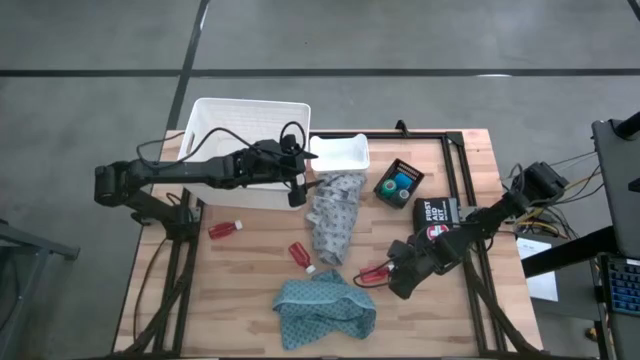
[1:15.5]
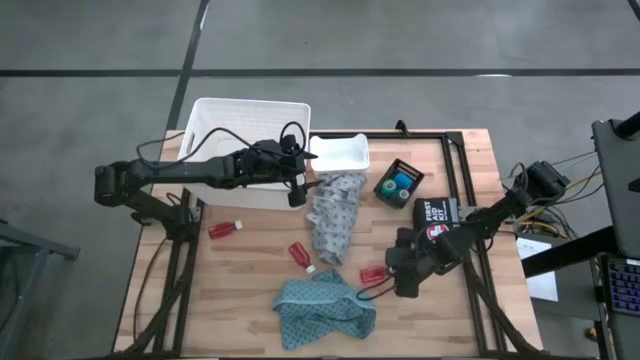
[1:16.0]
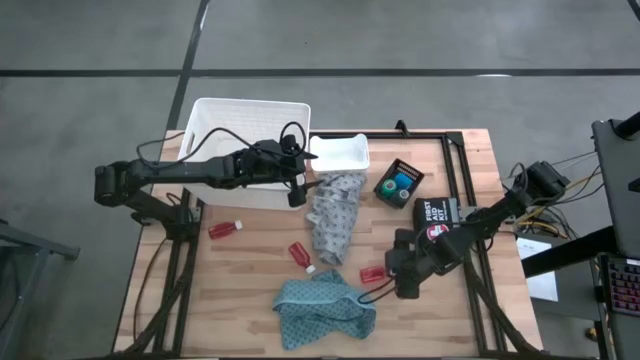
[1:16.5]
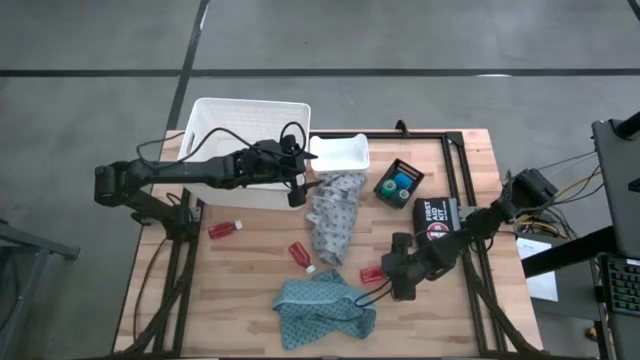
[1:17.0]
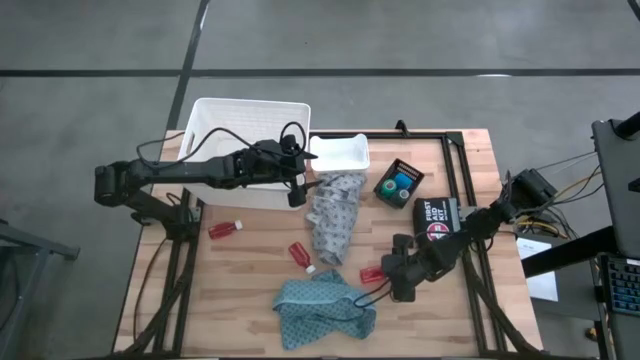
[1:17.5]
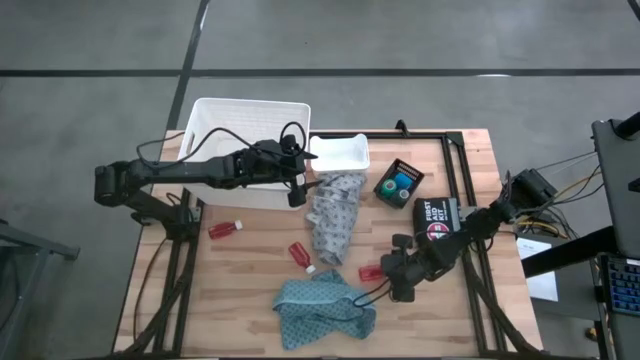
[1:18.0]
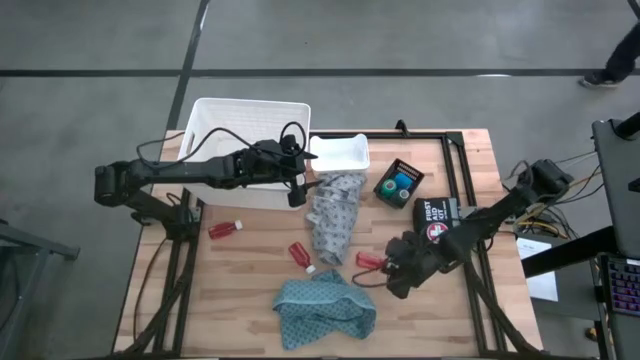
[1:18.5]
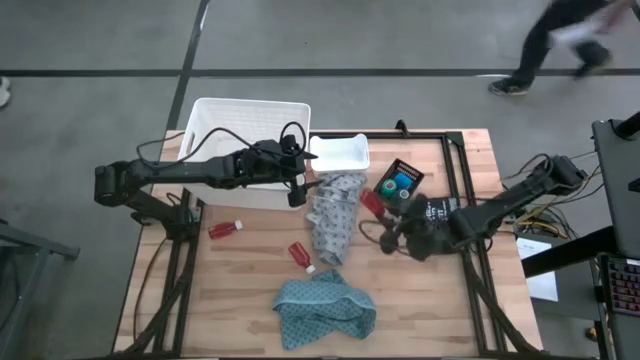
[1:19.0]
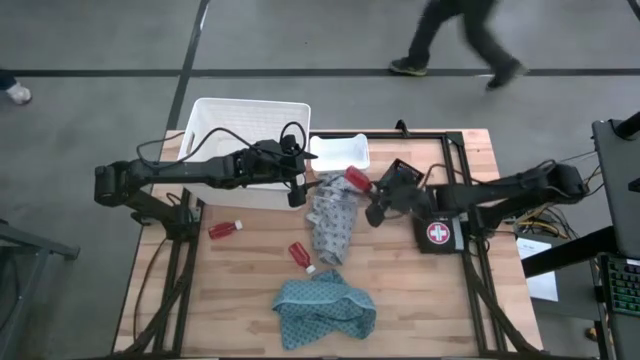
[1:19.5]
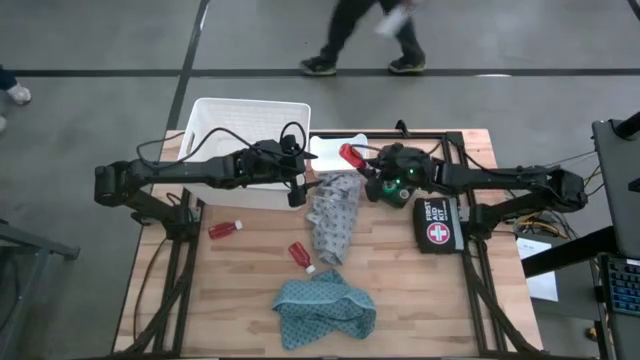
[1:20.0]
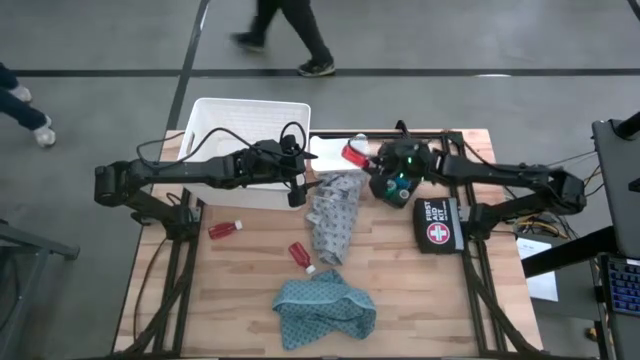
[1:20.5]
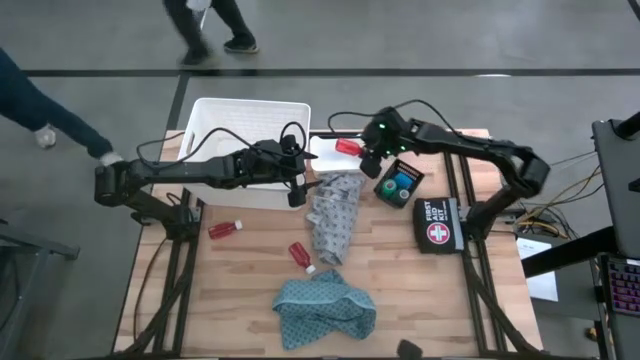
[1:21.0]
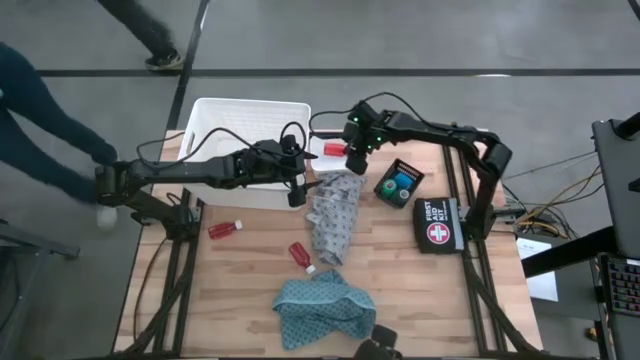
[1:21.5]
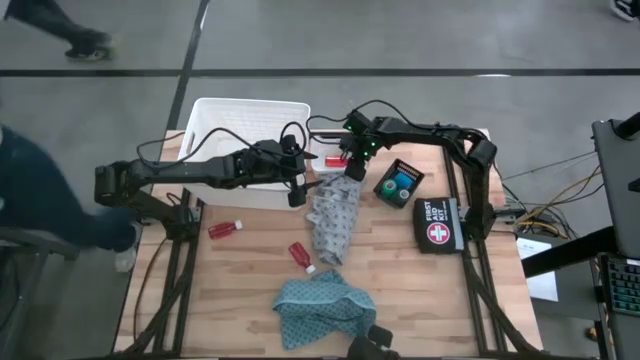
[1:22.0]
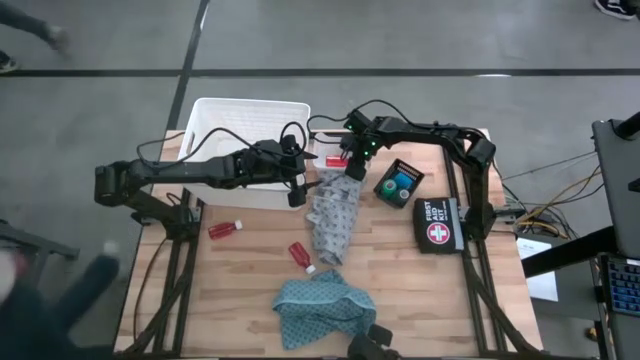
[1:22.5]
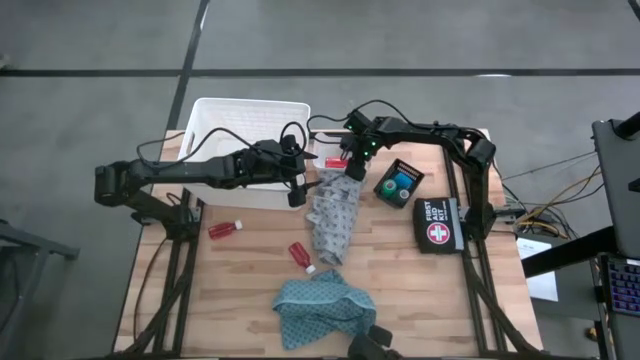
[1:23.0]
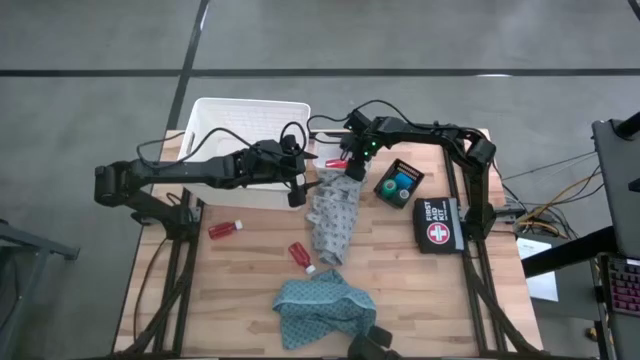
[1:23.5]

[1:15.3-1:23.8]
Task: Pick & Place Medicine items
Put the right red medicine bottle into the small white bin

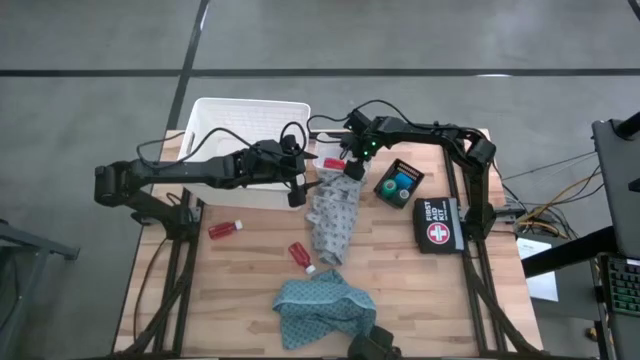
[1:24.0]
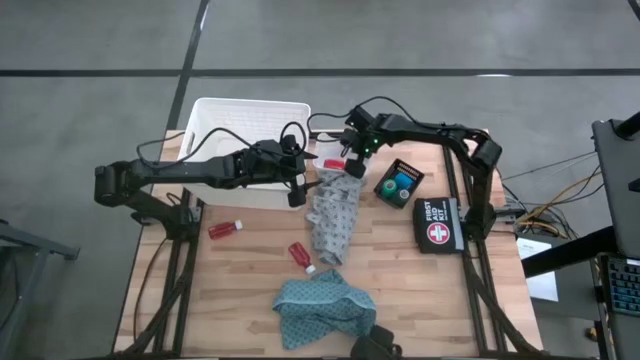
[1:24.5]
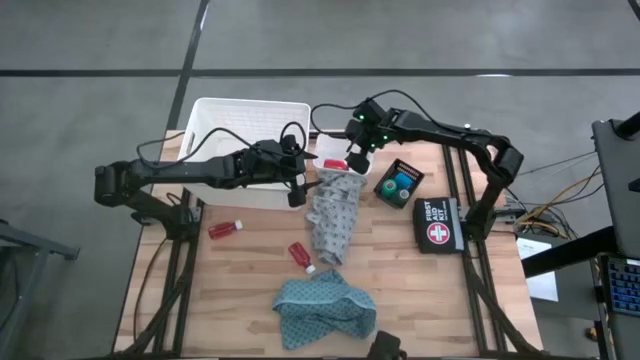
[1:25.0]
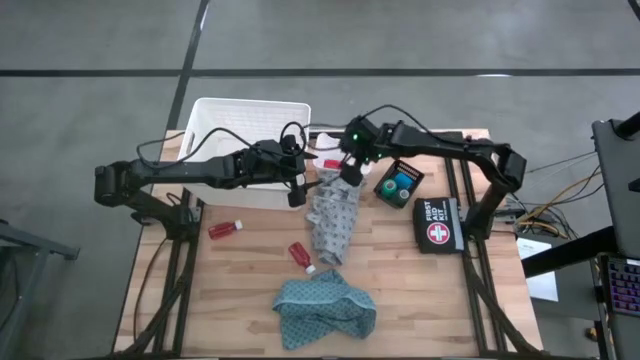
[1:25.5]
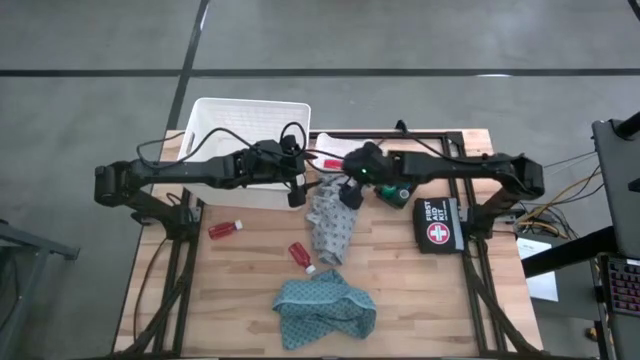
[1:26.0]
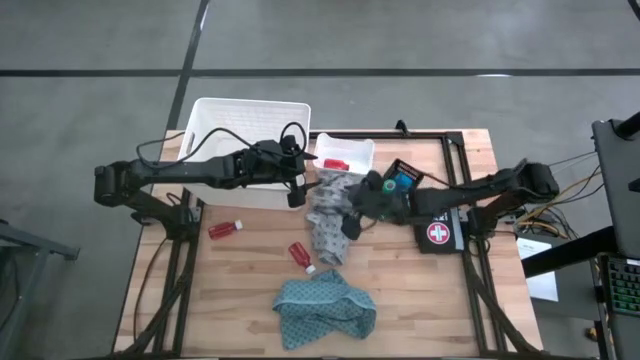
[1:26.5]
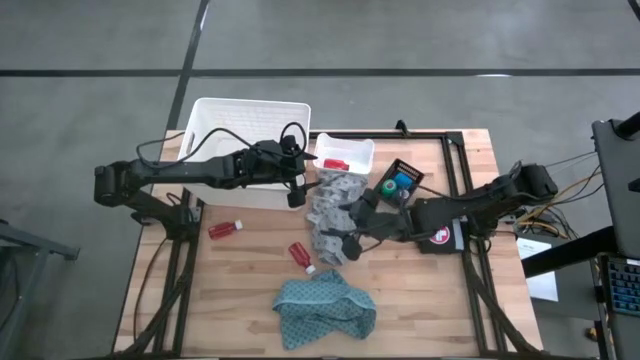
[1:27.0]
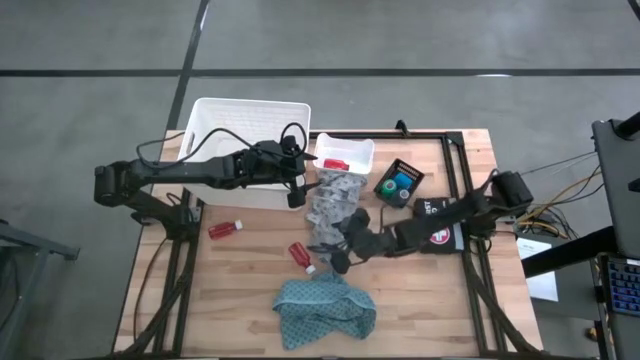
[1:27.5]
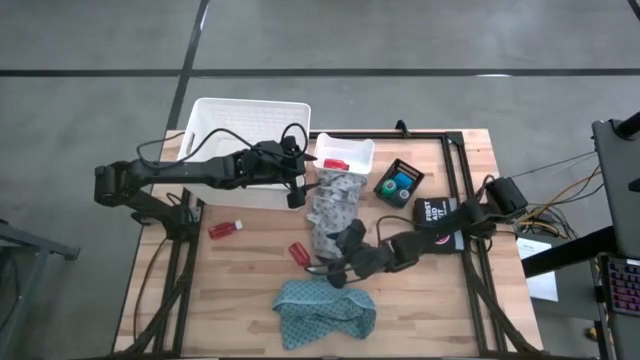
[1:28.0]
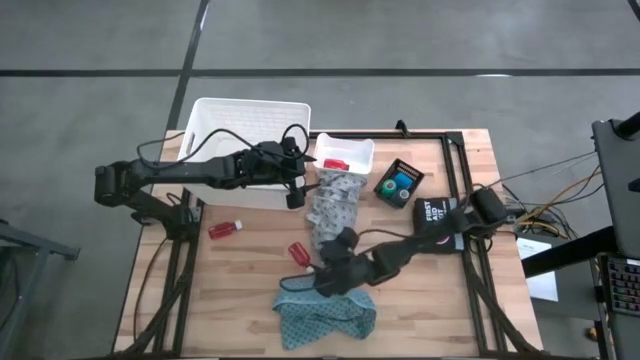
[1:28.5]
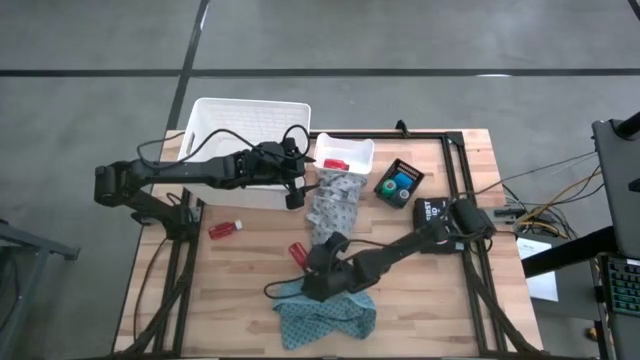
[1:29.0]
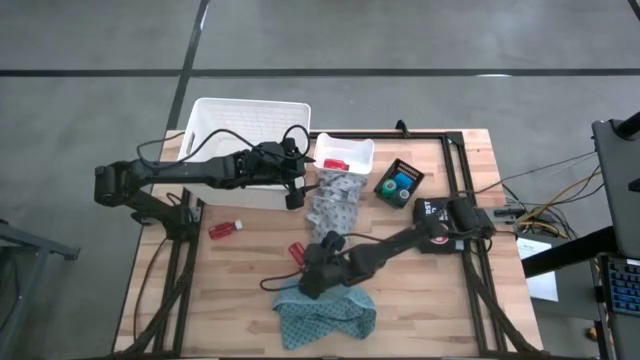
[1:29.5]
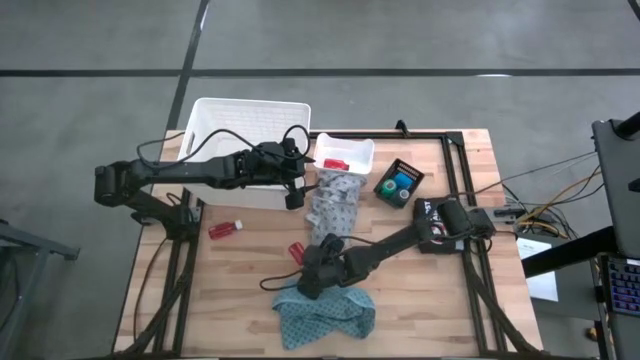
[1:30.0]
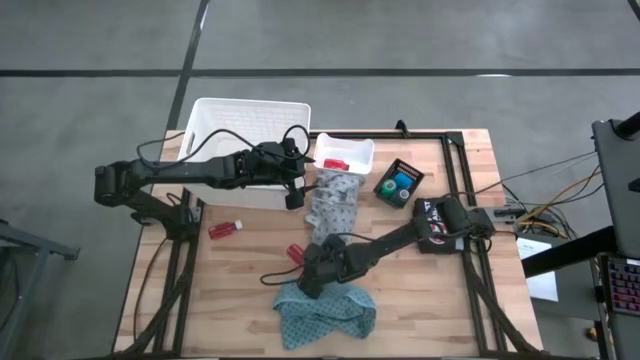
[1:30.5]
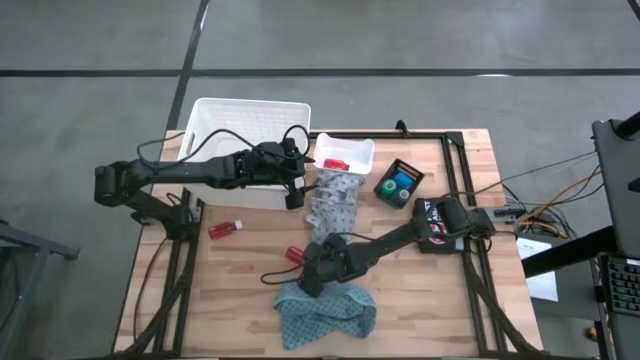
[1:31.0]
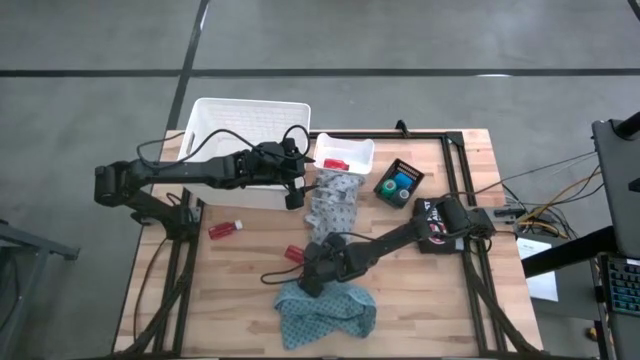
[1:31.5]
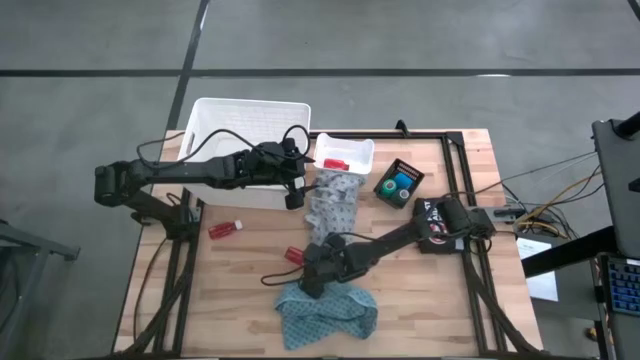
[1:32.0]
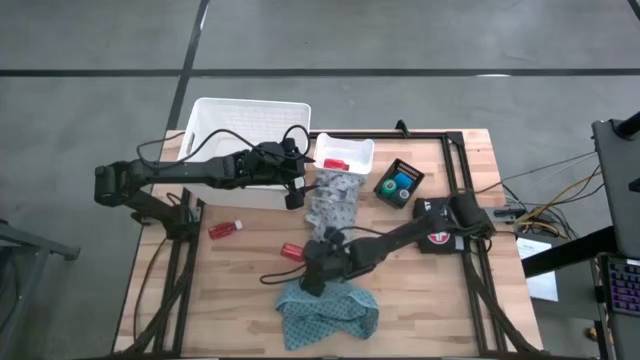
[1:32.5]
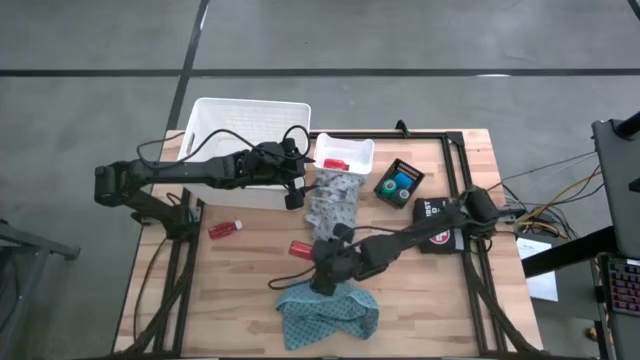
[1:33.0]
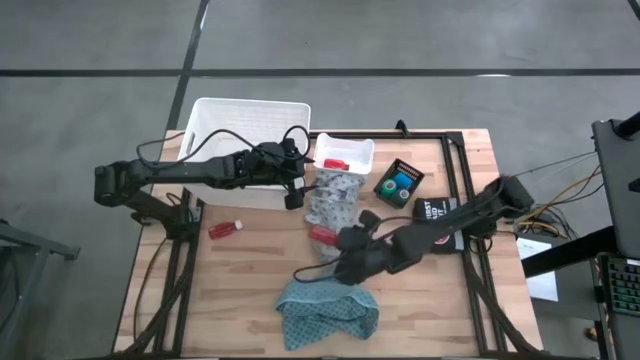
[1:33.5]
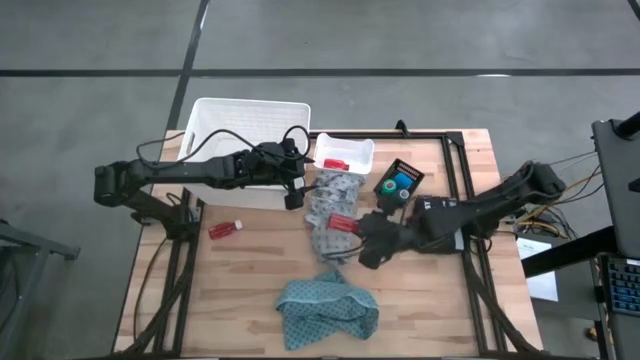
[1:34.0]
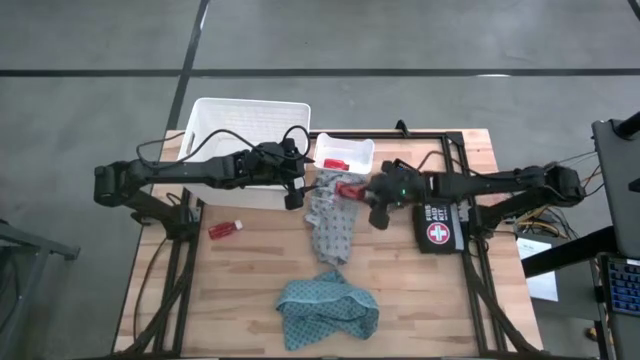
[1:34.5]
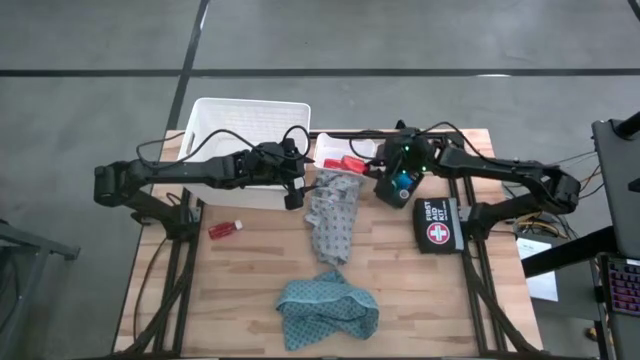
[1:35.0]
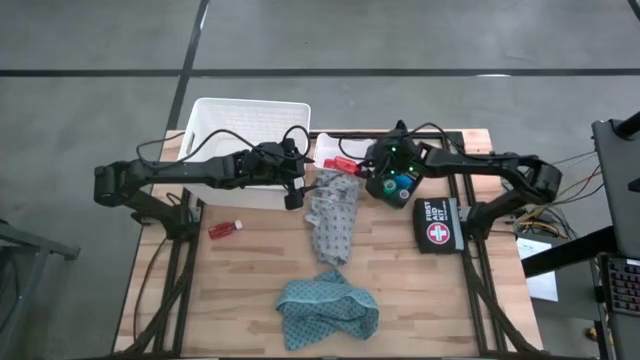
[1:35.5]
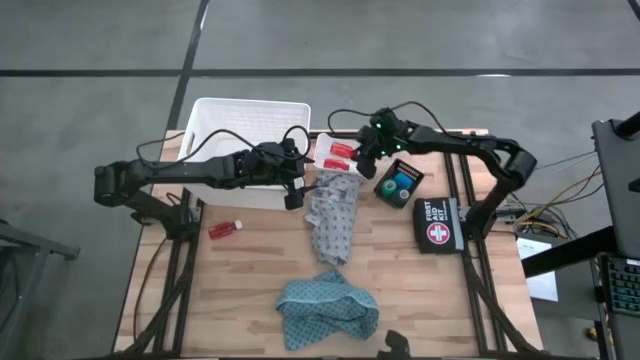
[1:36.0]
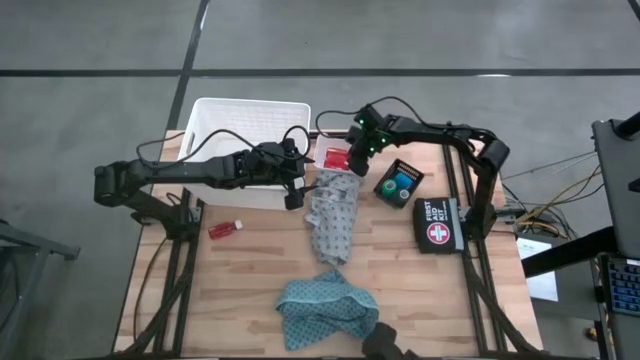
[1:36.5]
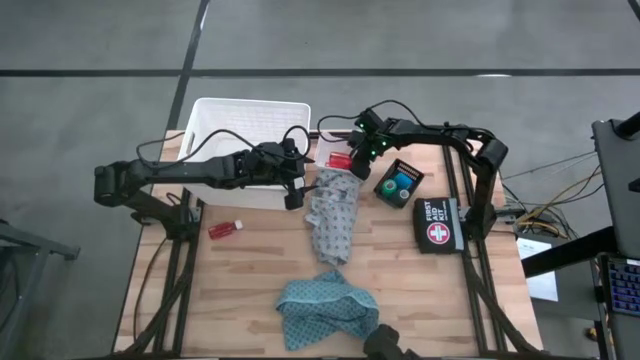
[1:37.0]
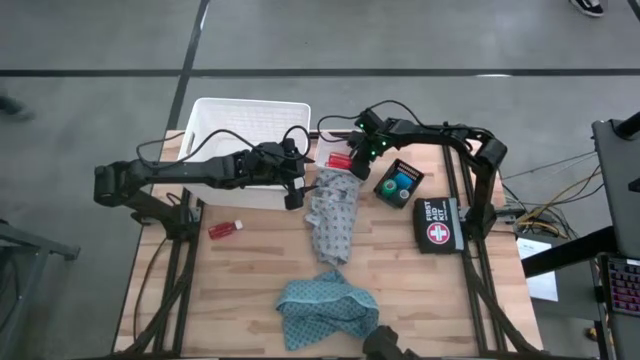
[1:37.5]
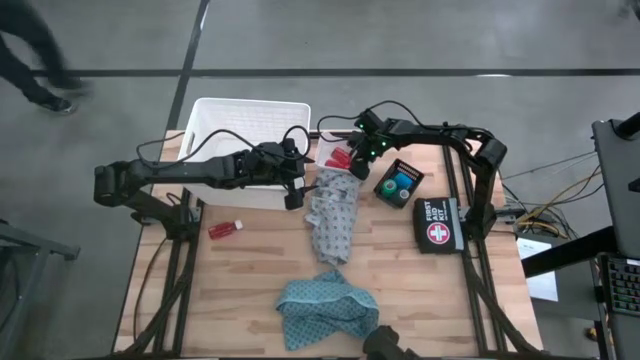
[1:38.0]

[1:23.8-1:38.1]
Put the right red medicine bottle into the small white bin
